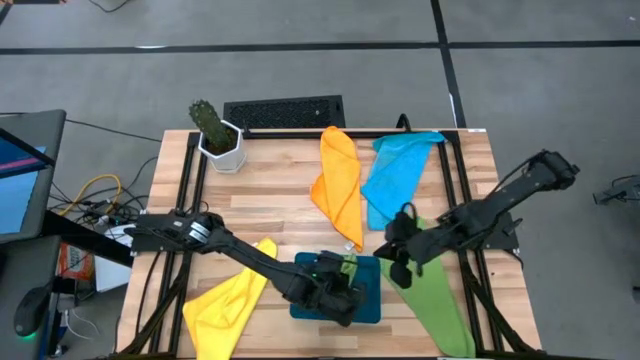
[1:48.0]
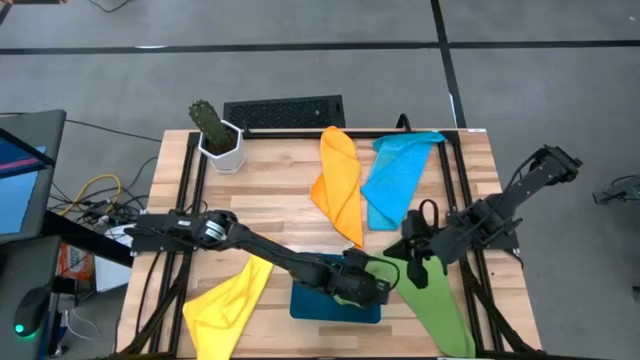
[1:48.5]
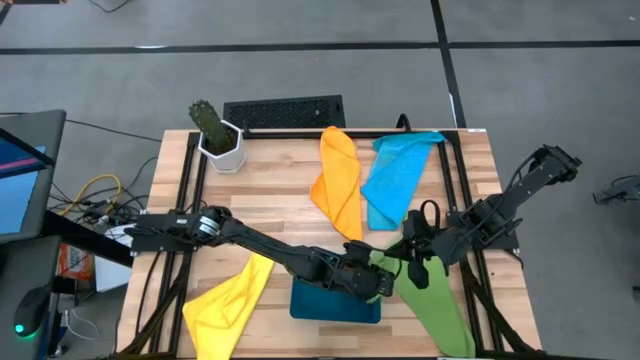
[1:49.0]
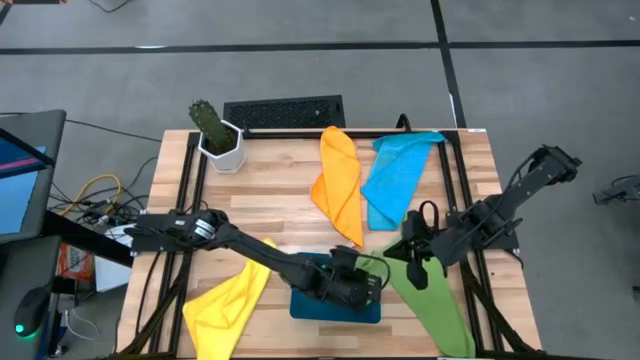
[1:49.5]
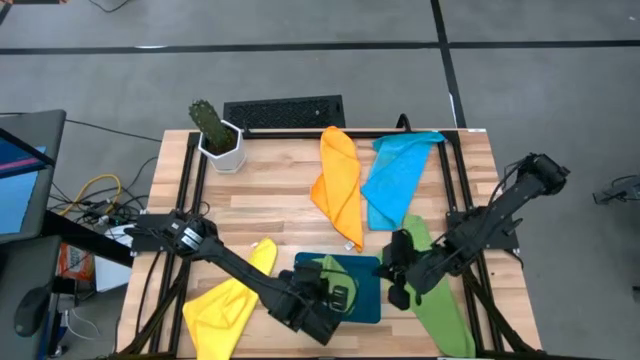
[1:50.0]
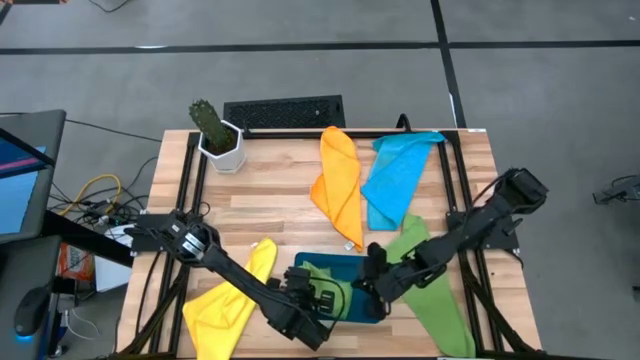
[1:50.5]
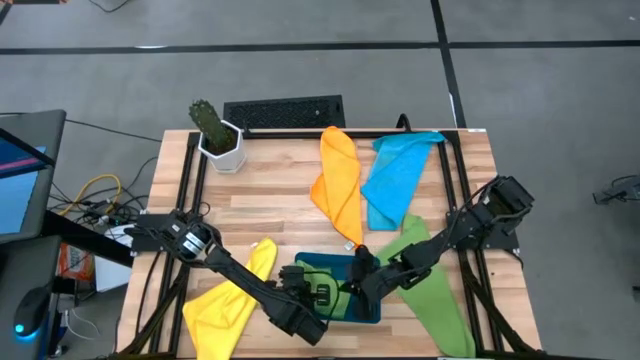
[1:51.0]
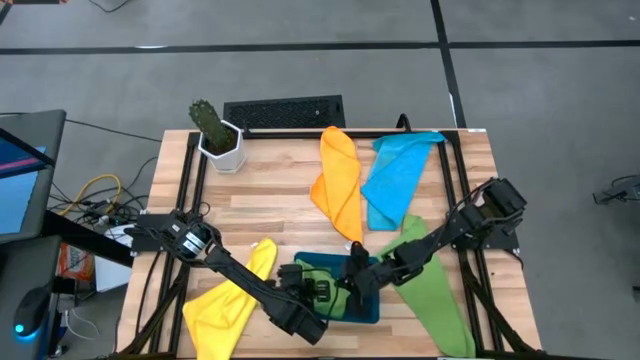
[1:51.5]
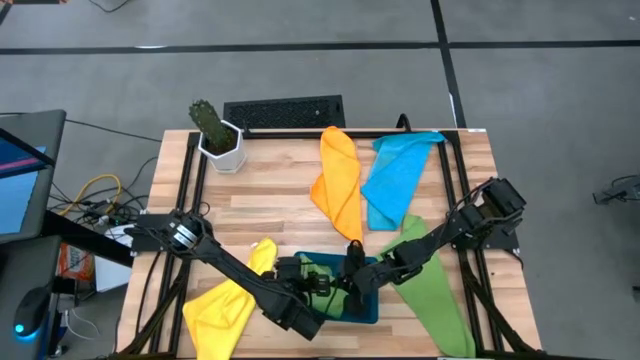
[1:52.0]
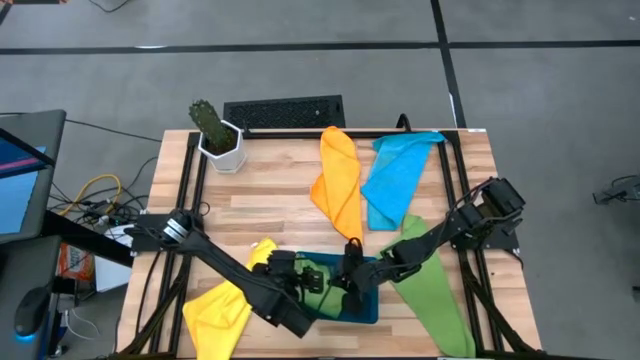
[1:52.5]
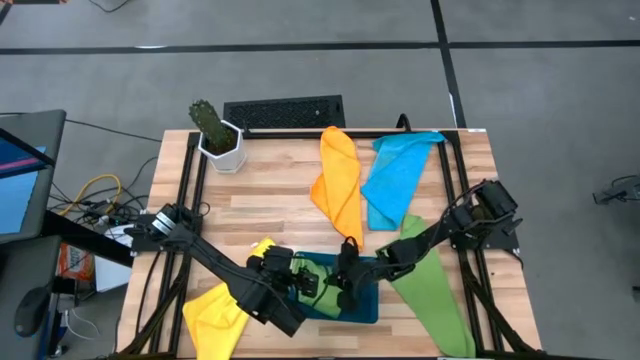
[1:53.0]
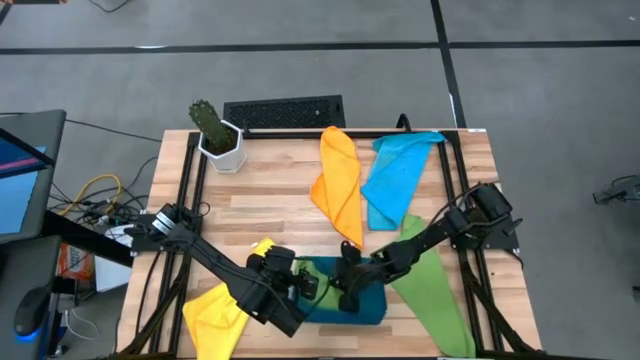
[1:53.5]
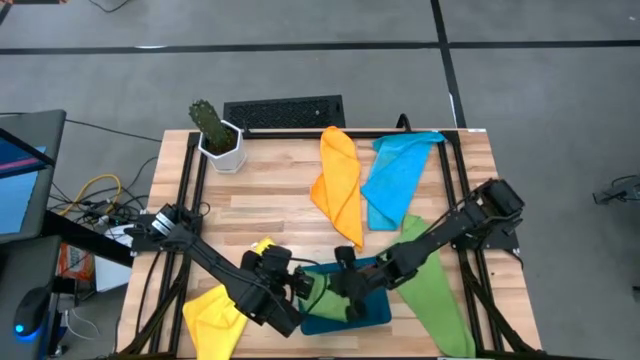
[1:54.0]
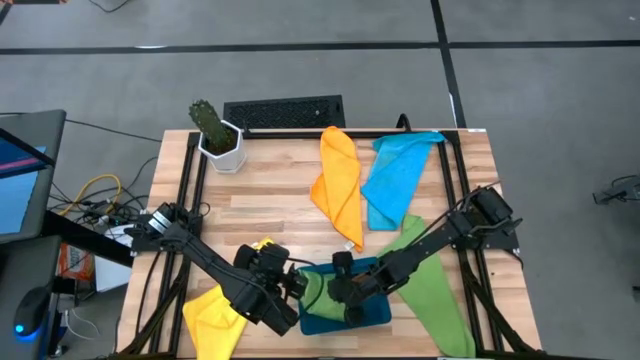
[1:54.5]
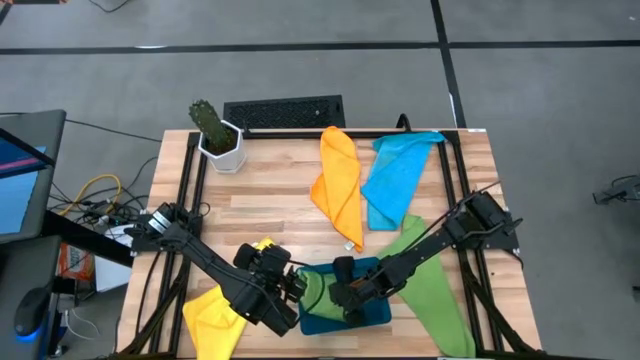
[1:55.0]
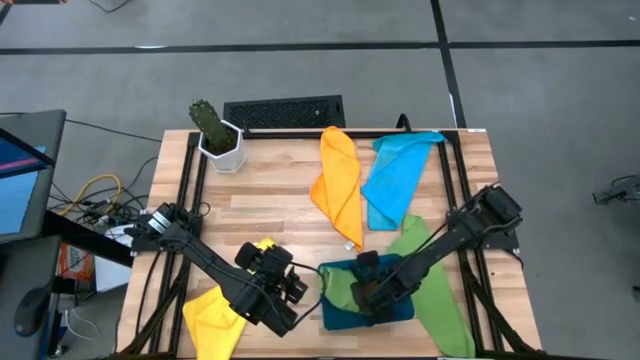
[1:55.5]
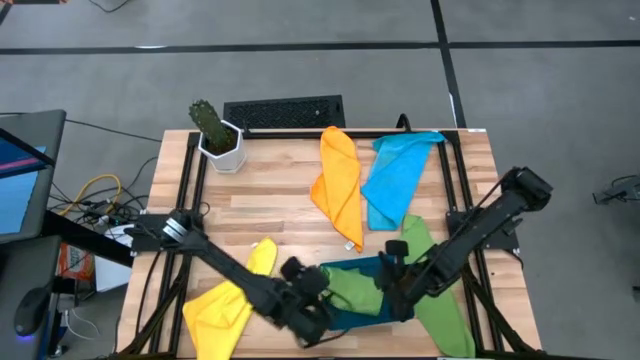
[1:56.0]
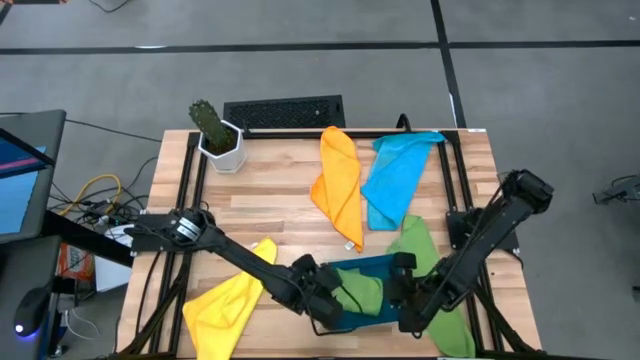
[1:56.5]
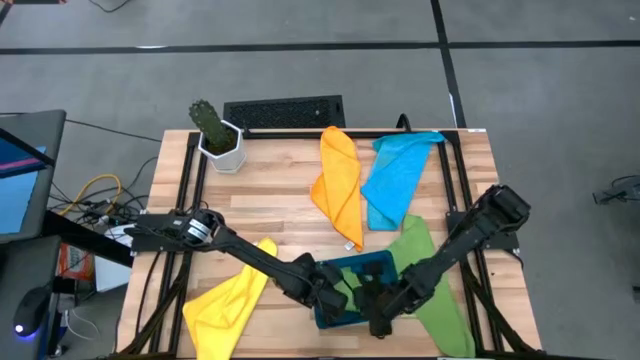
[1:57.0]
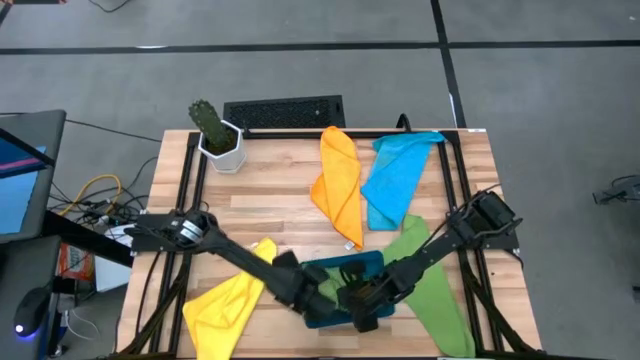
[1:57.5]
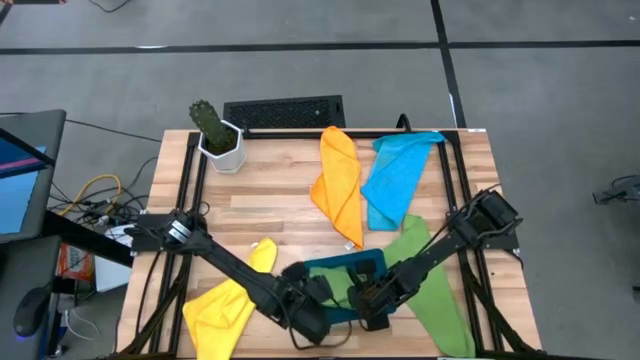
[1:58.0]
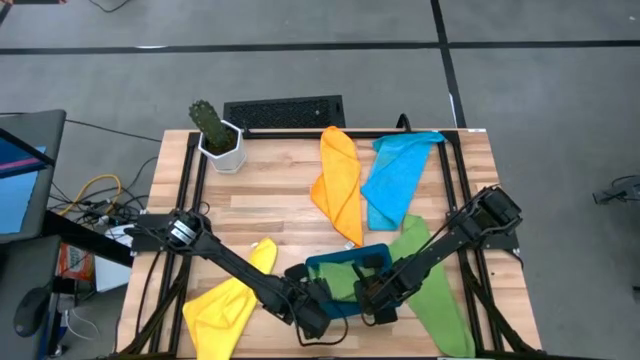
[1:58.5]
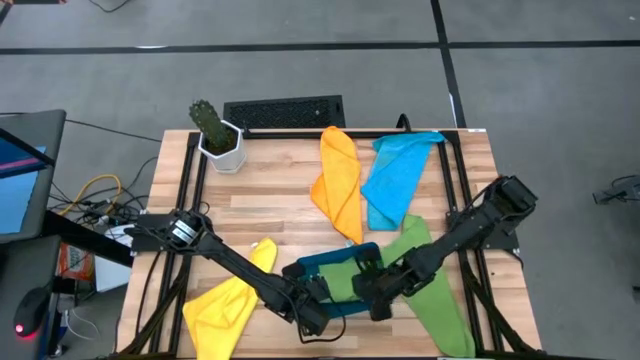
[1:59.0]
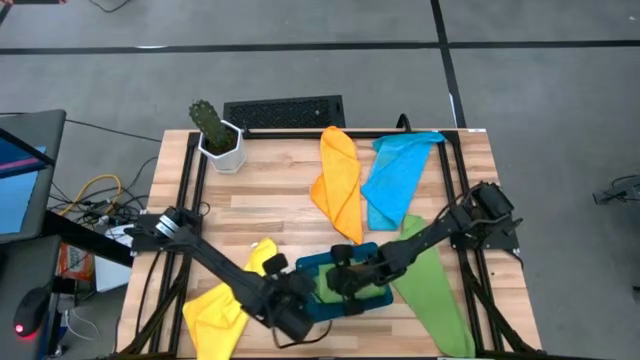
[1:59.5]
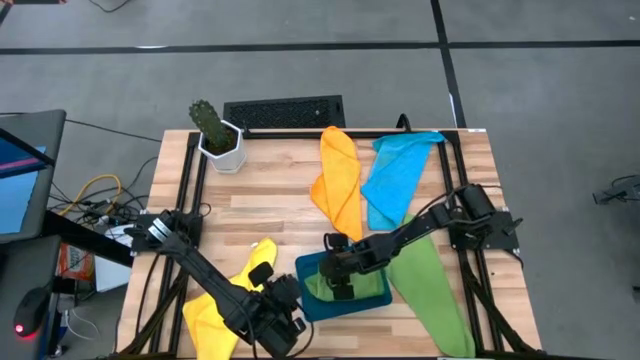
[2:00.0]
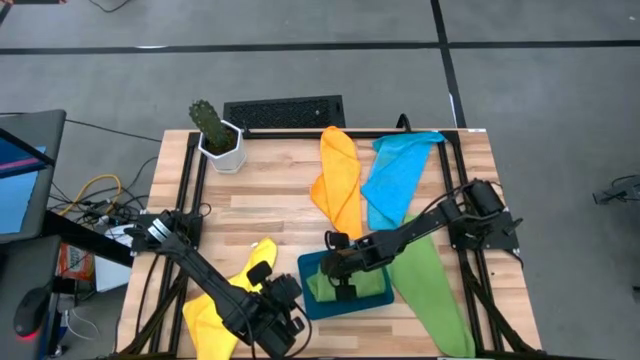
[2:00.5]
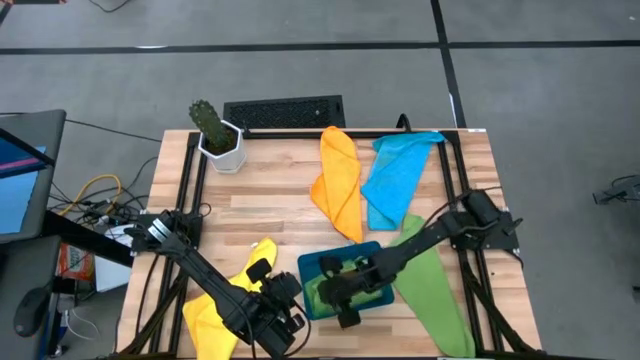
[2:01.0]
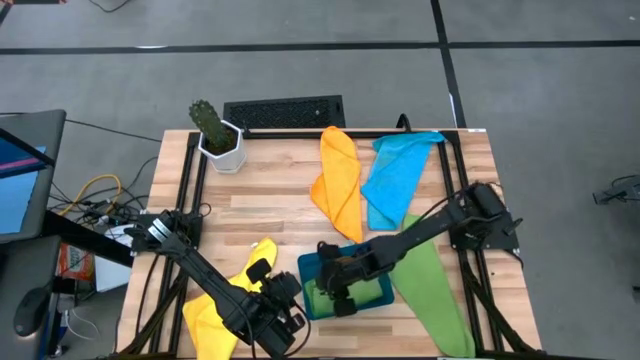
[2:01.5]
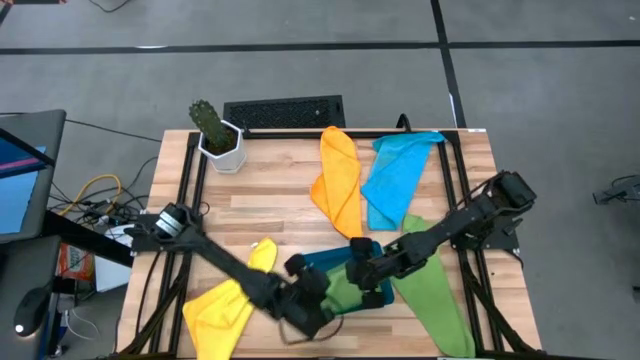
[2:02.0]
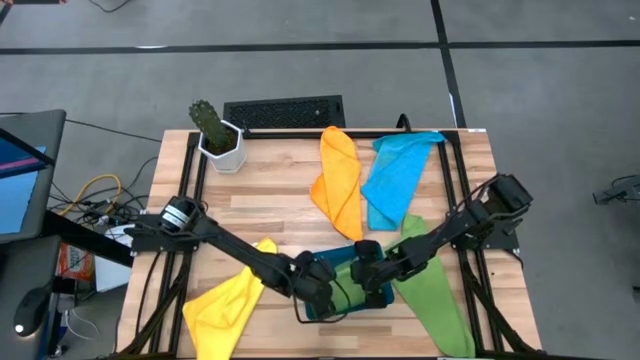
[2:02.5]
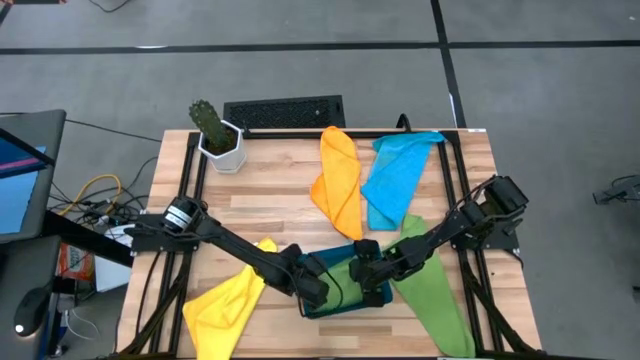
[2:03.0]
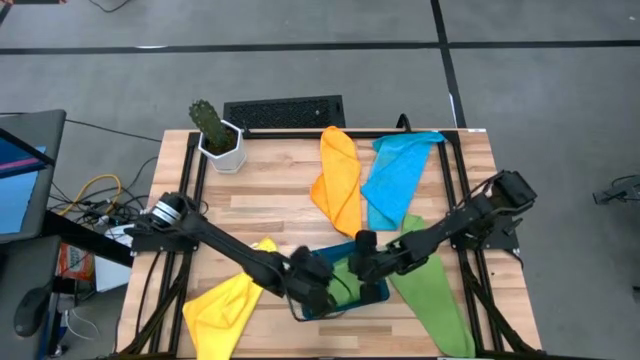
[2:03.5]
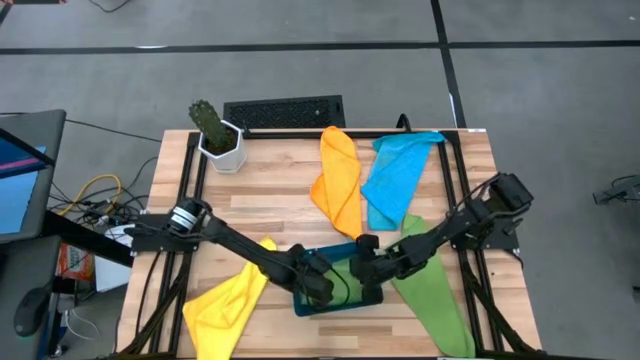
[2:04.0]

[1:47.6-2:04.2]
Task: Fold microfiber towels
Put the folded green microfiber towel into the blue bin

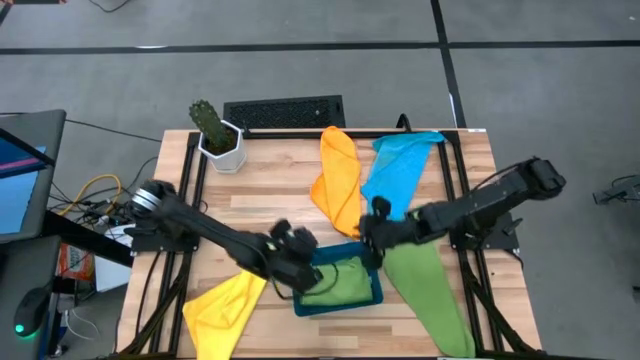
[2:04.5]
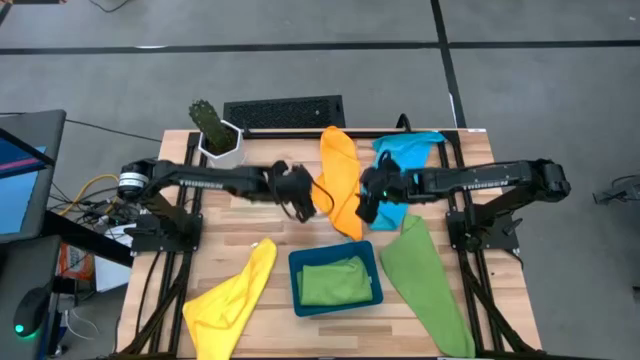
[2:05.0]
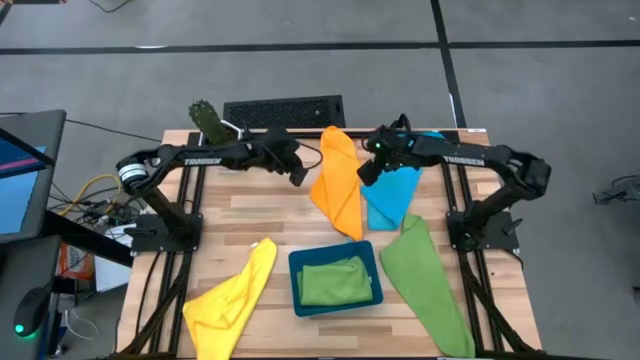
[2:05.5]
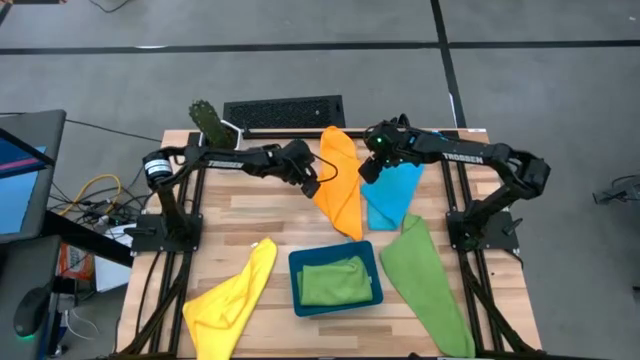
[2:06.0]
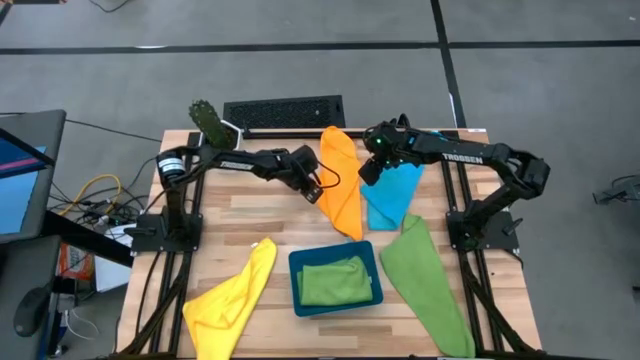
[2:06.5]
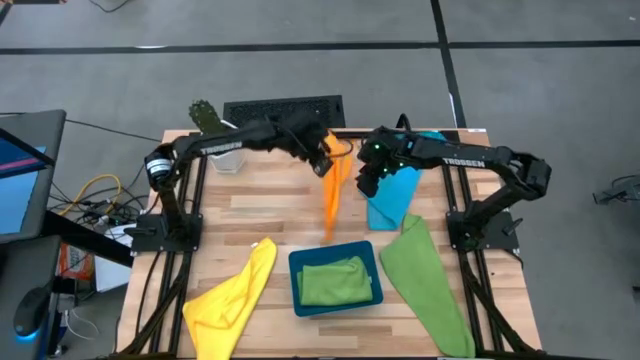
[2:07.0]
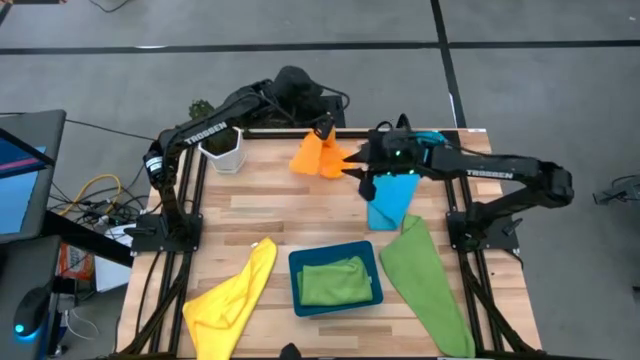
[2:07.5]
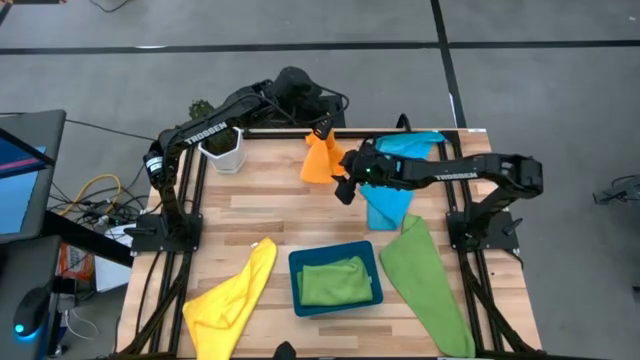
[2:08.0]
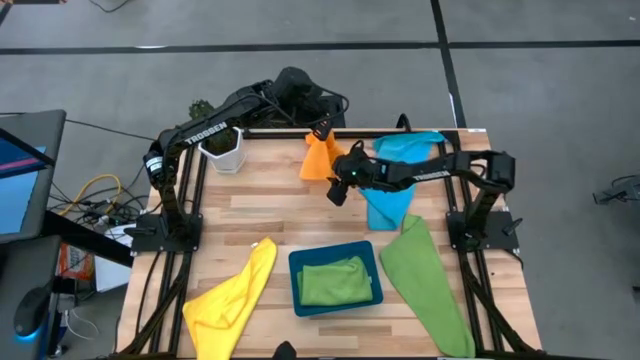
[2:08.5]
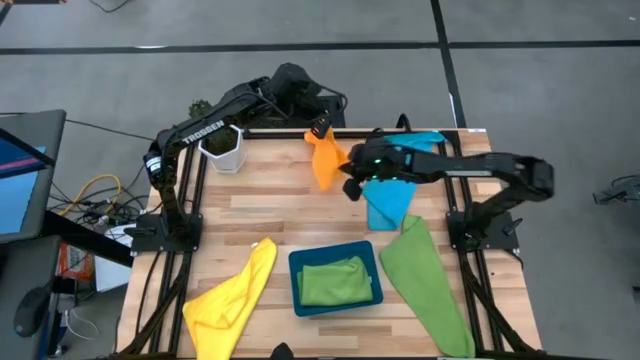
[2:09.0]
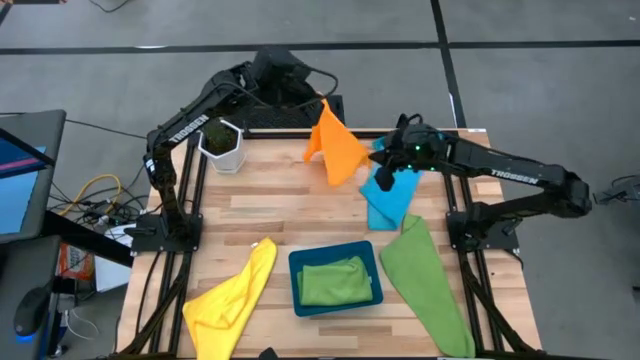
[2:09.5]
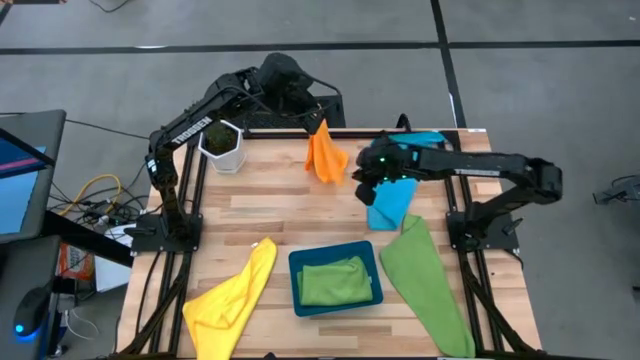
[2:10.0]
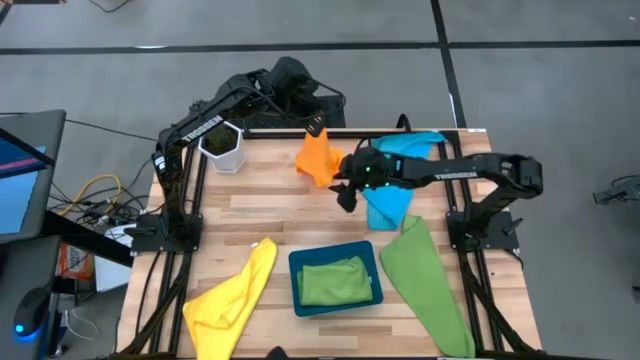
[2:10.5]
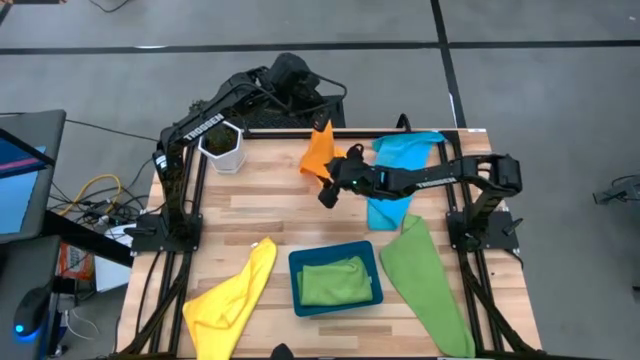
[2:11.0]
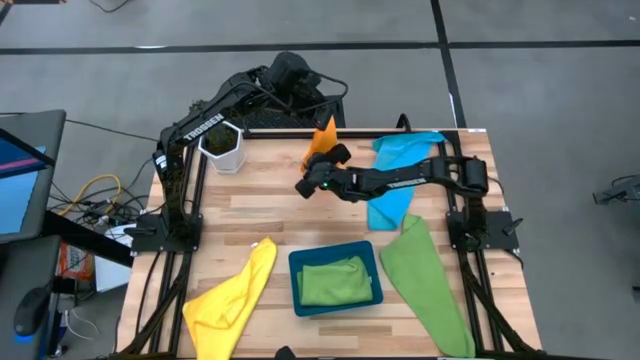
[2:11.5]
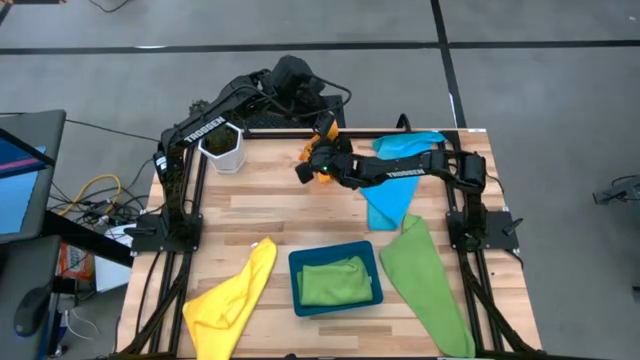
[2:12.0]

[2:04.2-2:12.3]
Fold the orange microfiber towel
